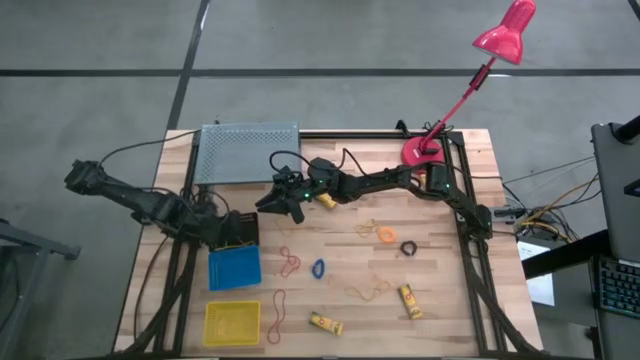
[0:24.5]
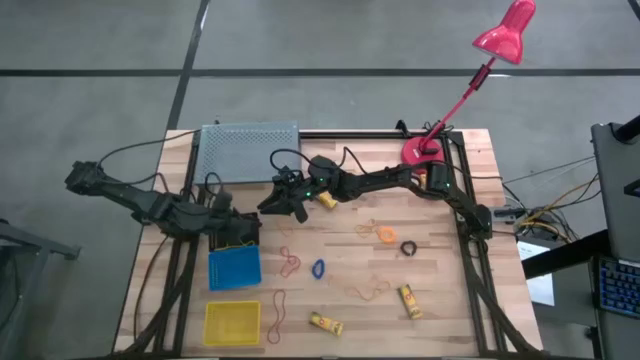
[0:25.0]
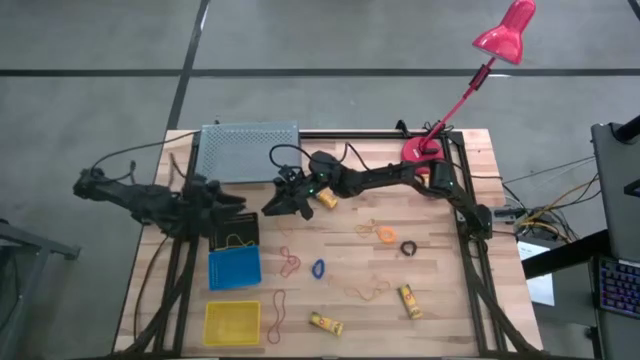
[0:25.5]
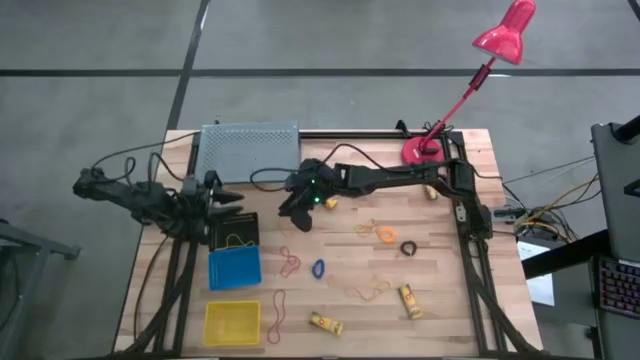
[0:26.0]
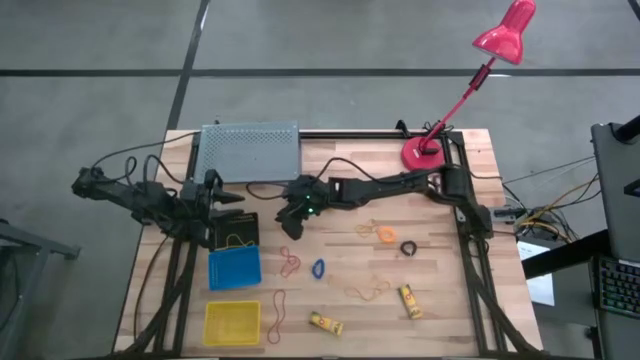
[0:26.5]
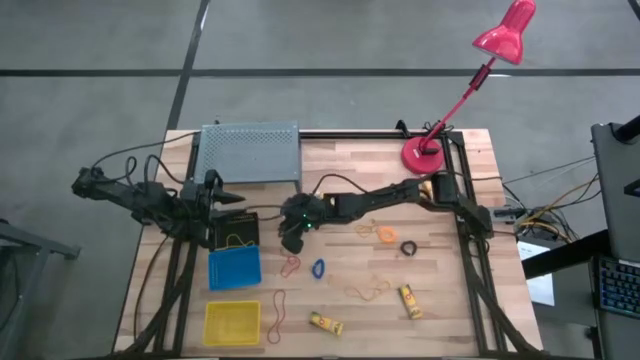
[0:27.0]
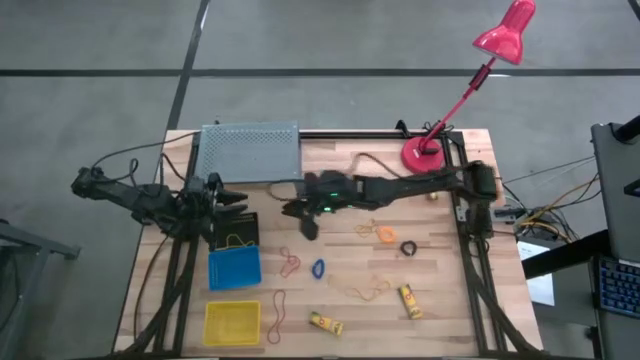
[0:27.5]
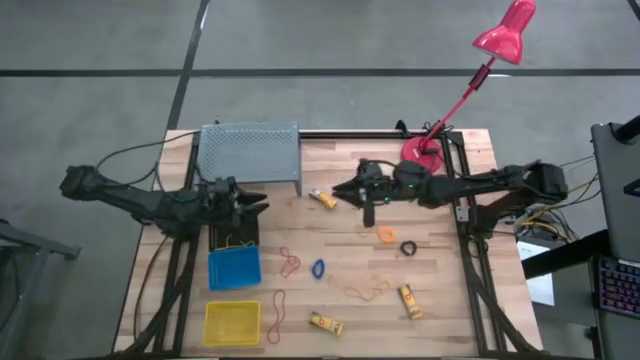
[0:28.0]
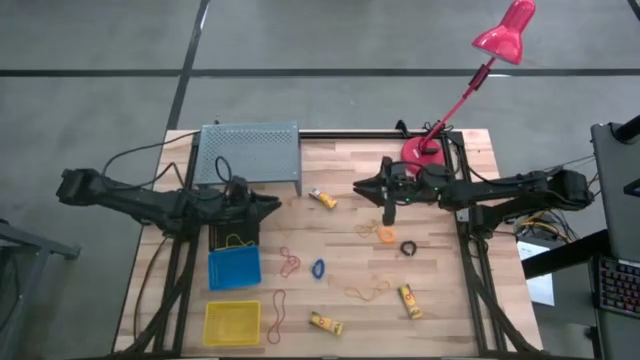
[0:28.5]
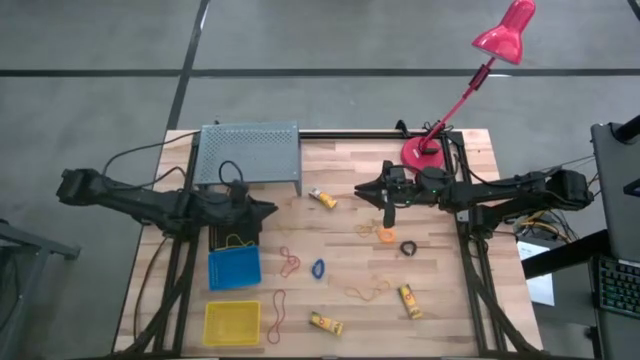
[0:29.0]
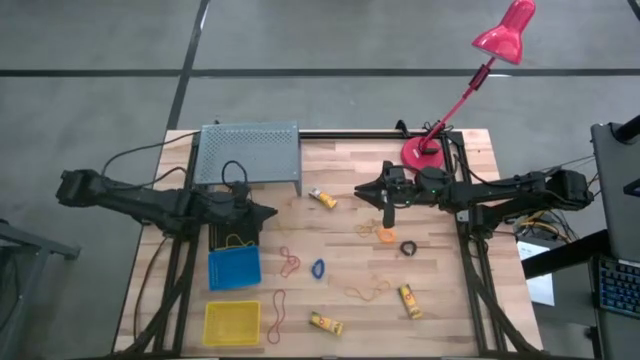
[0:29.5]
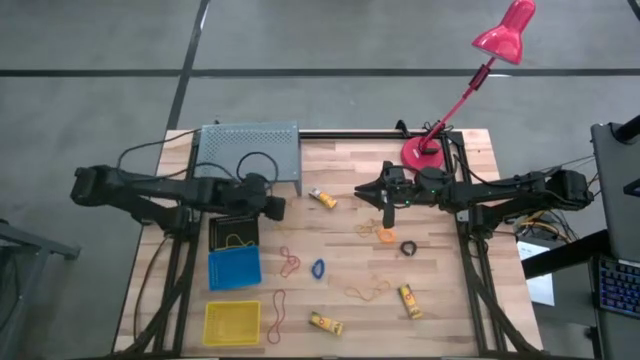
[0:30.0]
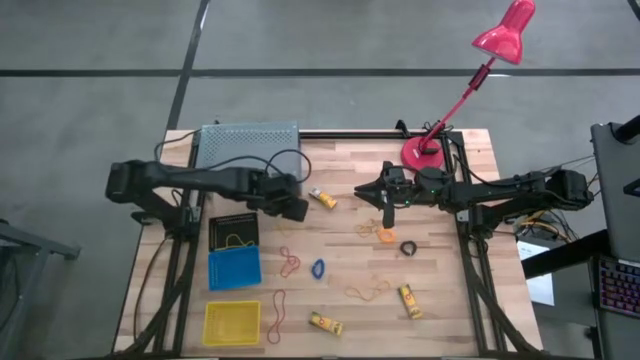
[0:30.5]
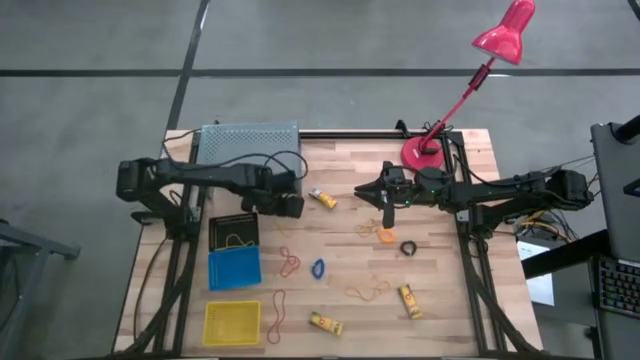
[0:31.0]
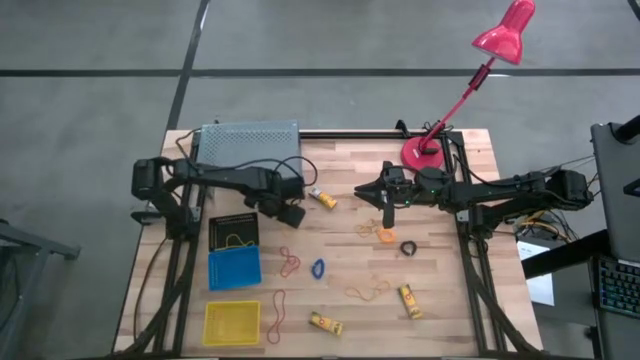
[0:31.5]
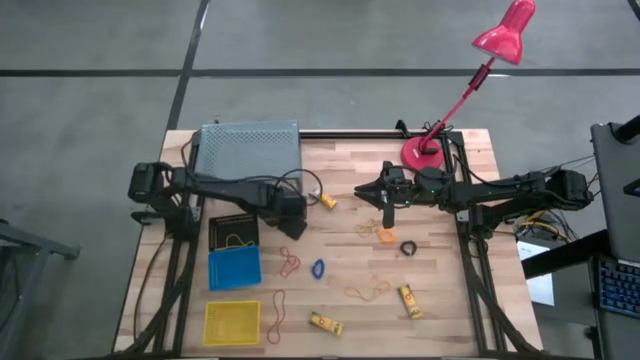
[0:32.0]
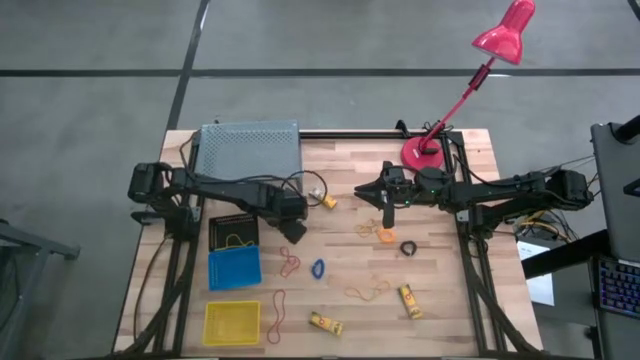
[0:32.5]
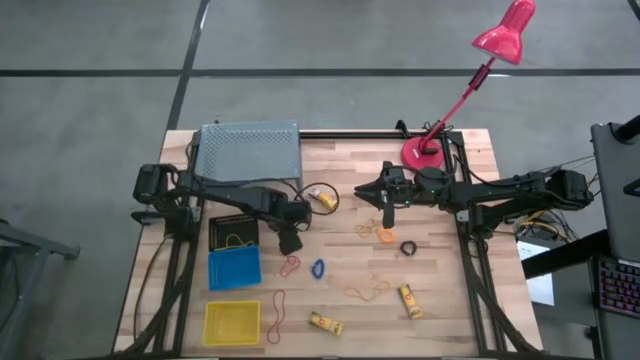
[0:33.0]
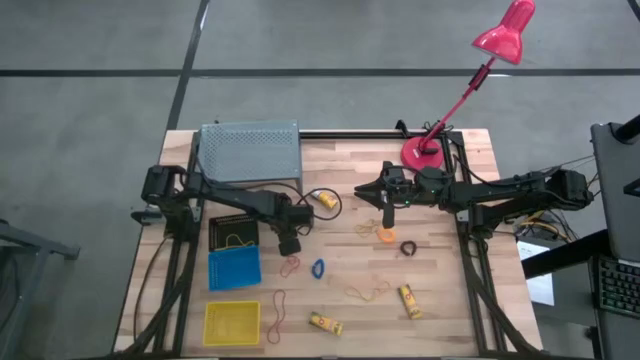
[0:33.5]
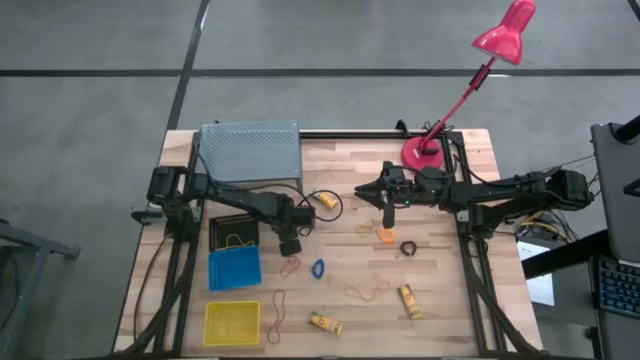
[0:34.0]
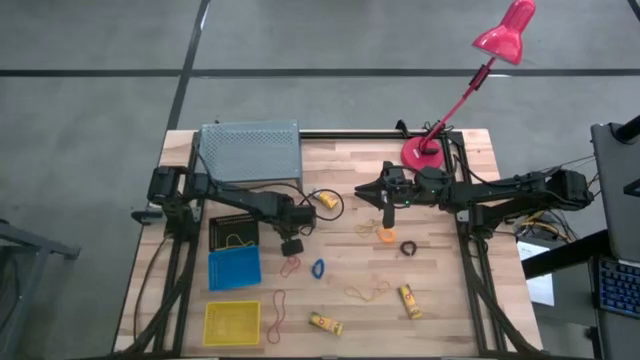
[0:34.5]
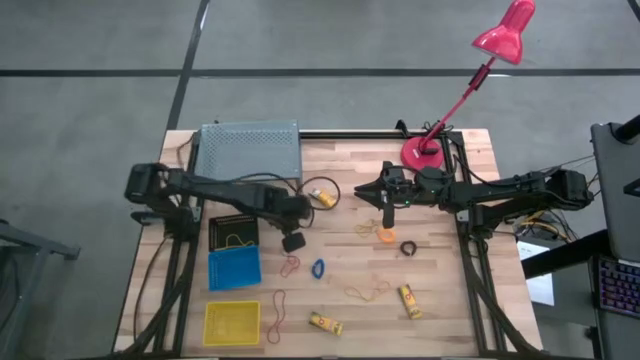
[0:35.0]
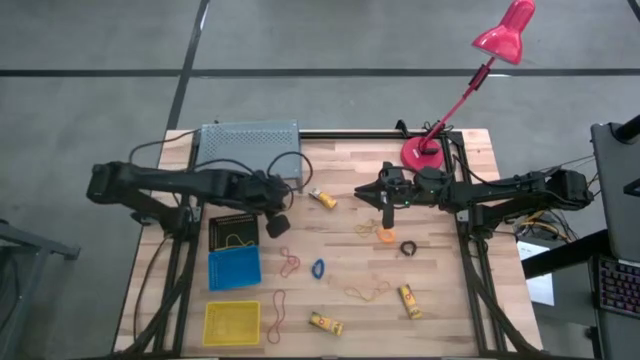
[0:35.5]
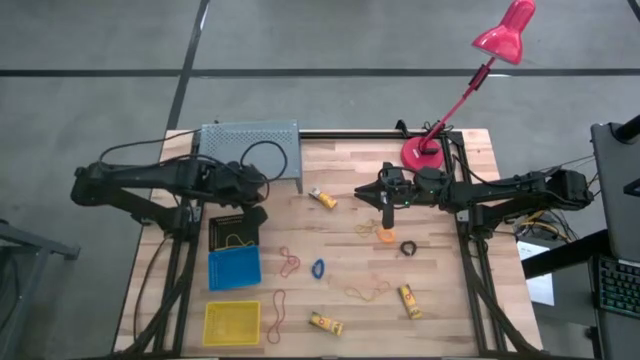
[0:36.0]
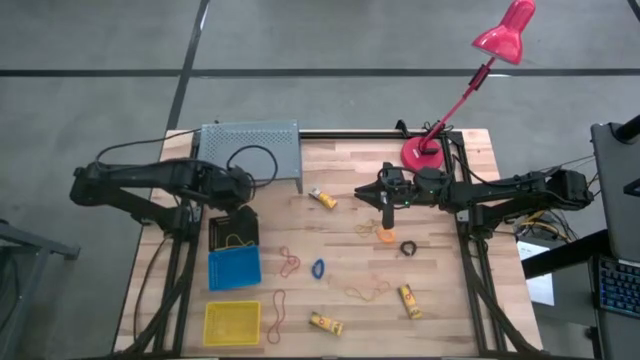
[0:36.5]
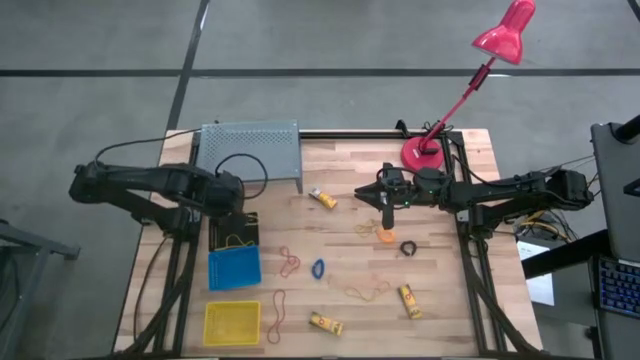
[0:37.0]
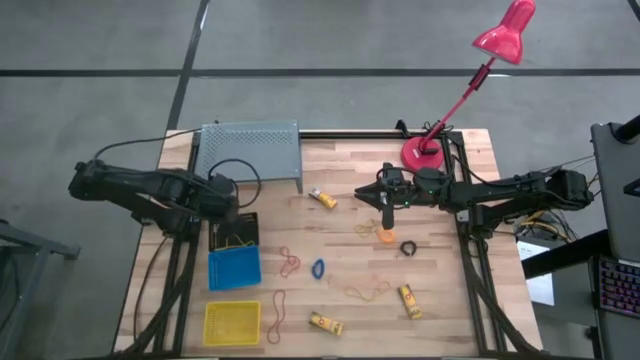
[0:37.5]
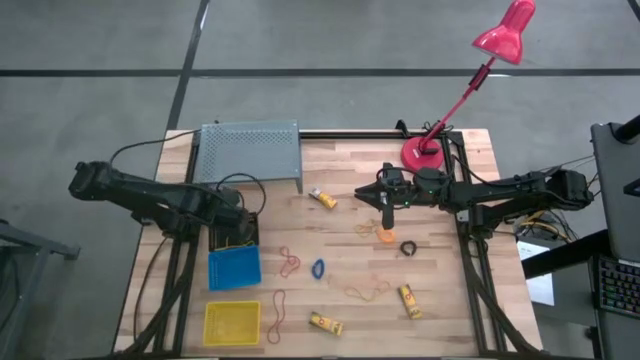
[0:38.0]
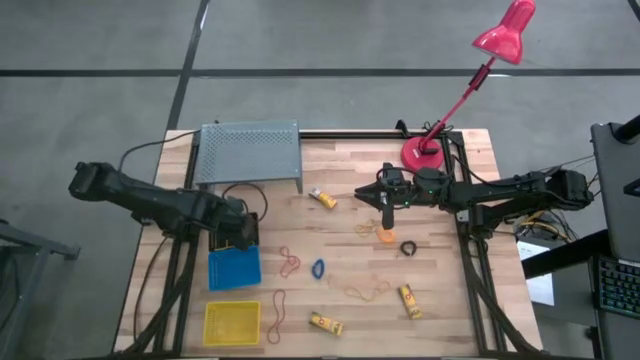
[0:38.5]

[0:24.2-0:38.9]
Task: Pick & Place Office Desk Supplies
Put the yellow rubber band in the black bin

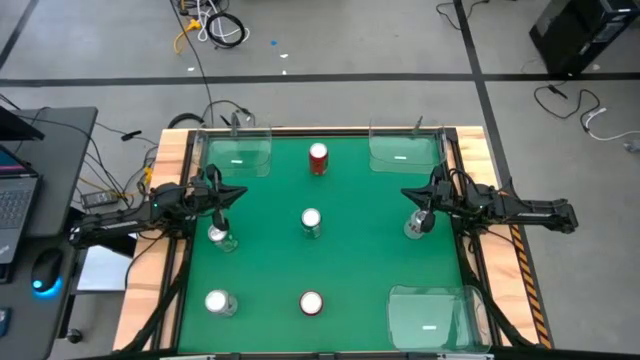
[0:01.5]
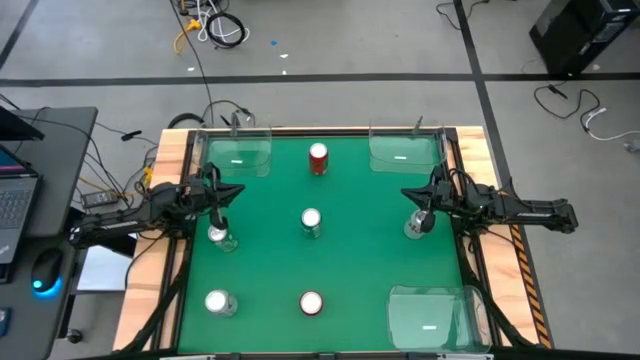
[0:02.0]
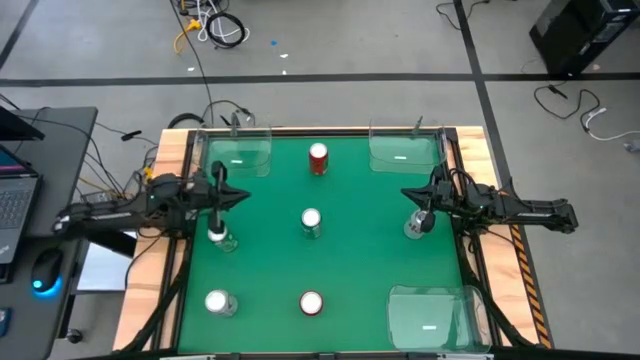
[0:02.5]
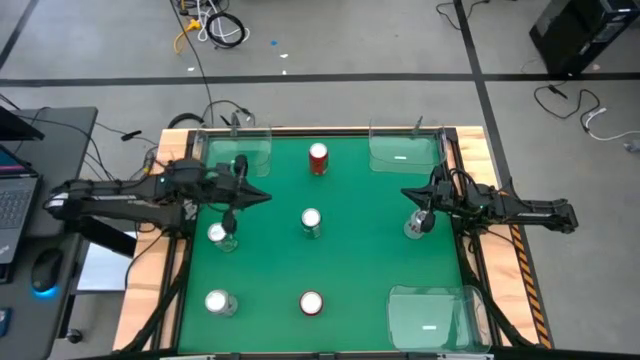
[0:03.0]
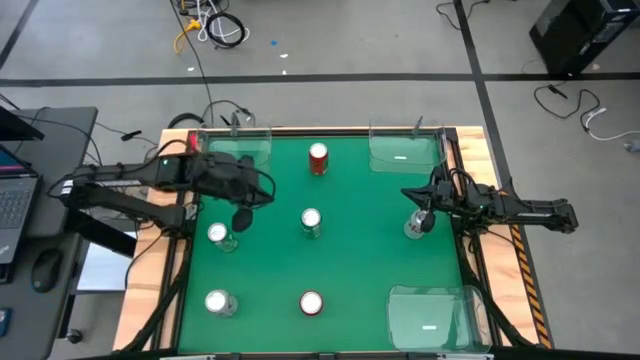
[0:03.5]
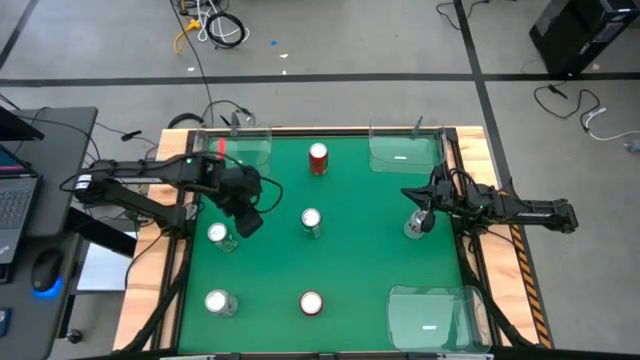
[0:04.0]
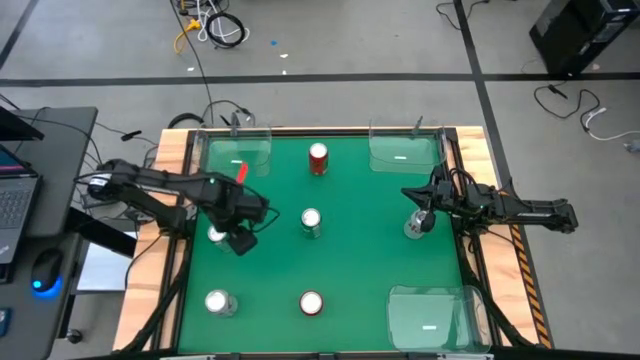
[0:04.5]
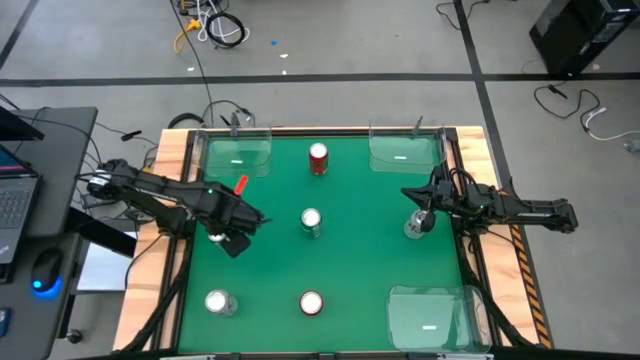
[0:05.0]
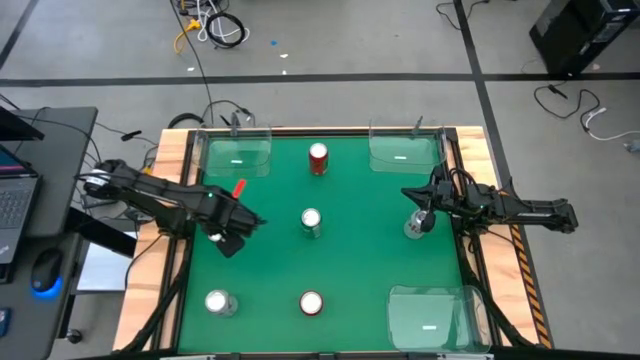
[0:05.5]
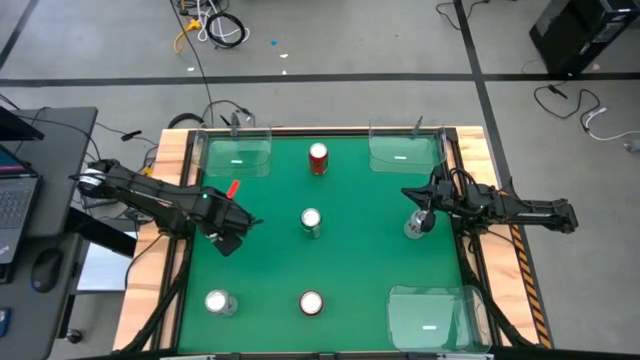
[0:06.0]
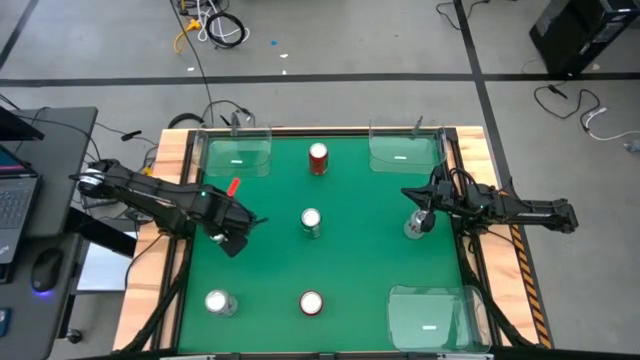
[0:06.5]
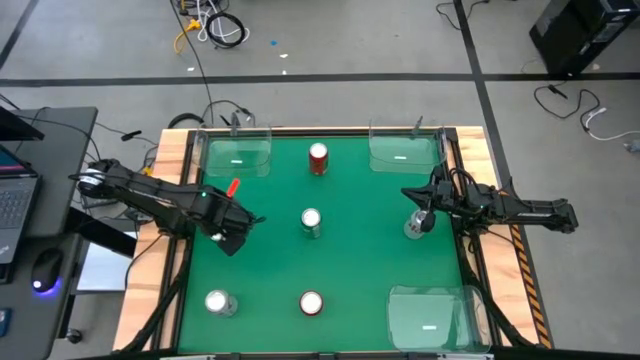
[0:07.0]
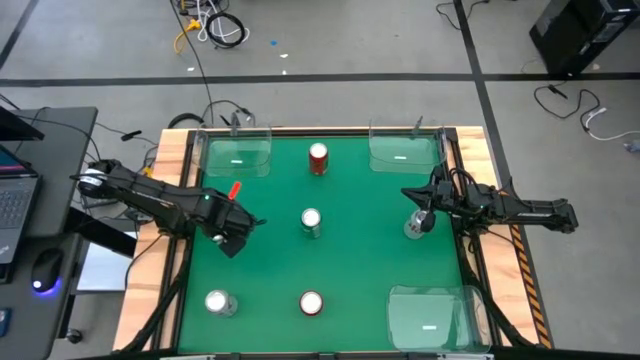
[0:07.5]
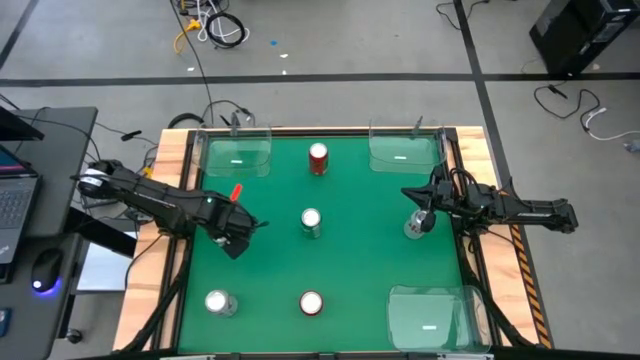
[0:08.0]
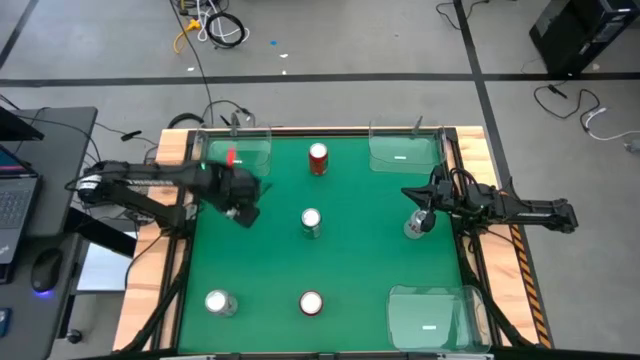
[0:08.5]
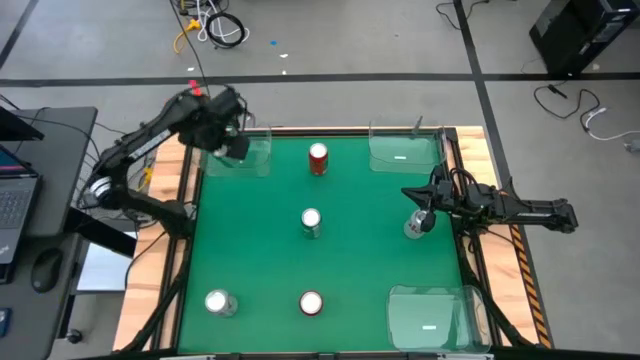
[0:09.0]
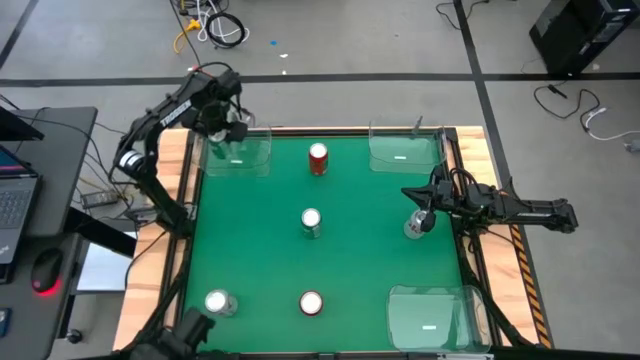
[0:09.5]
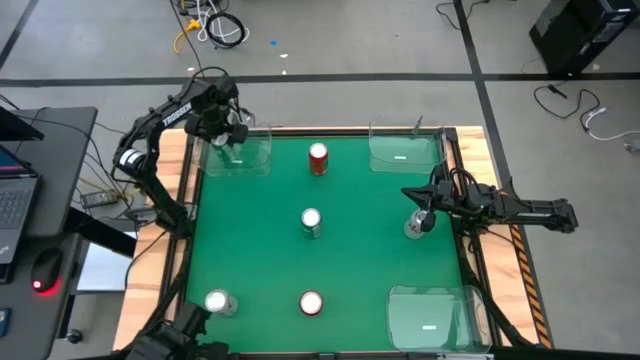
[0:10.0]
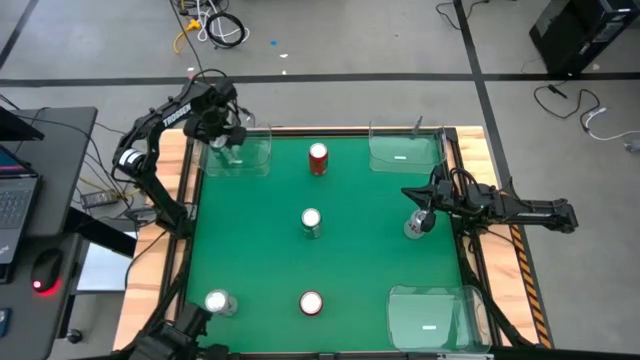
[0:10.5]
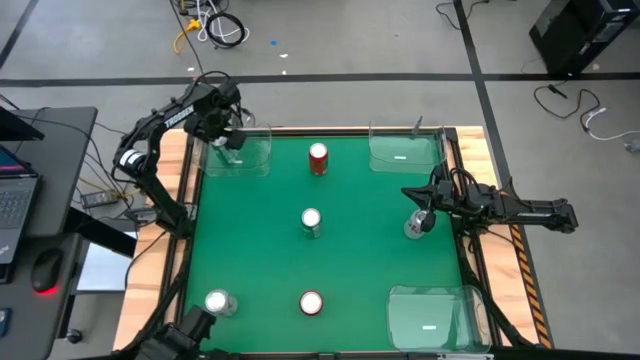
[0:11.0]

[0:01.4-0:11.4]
Task: Sort soda cans
Put the left green soda can into the top left transparent bin
